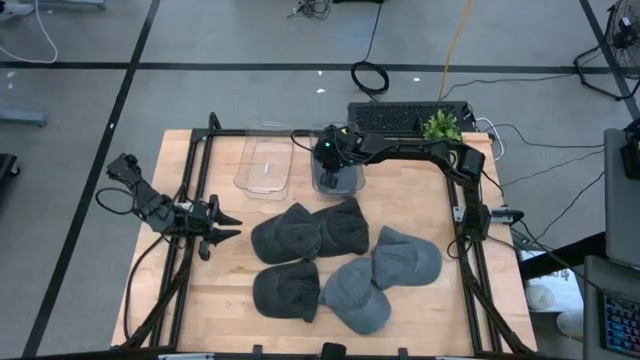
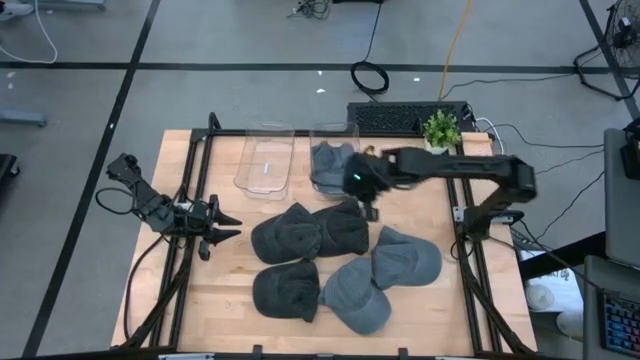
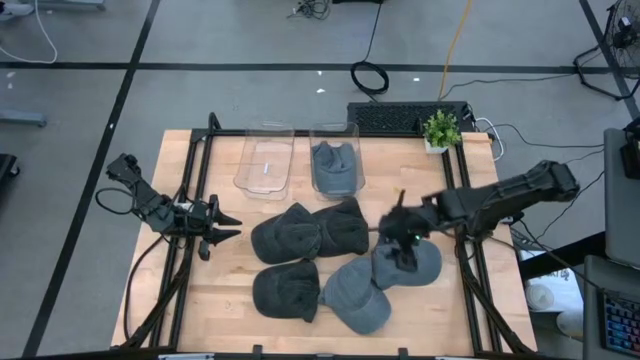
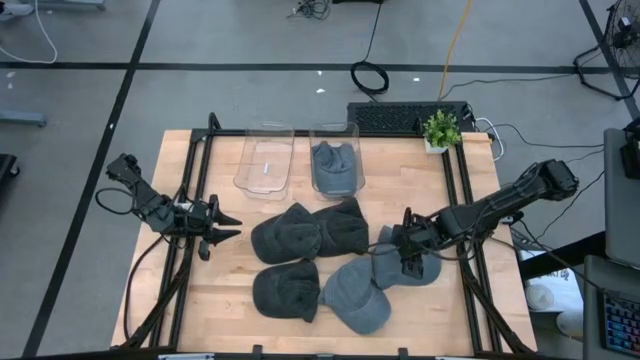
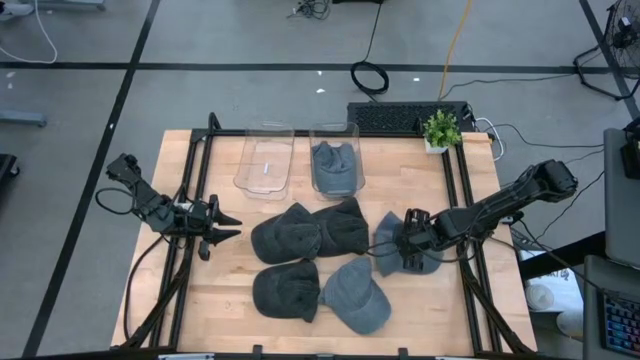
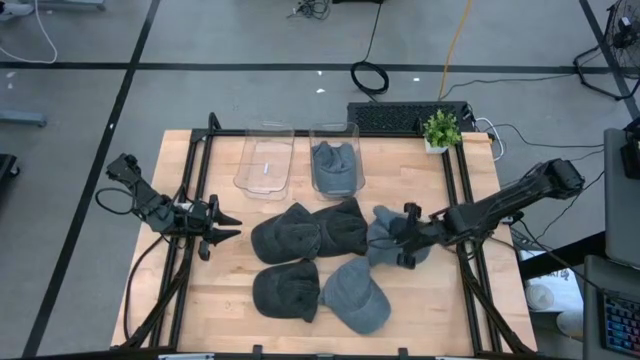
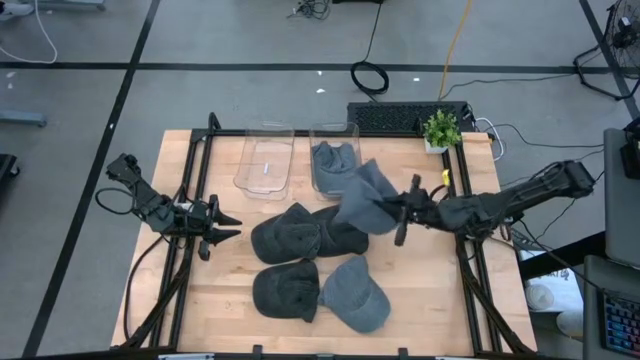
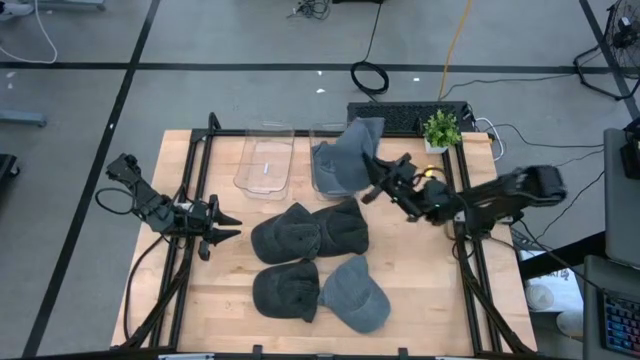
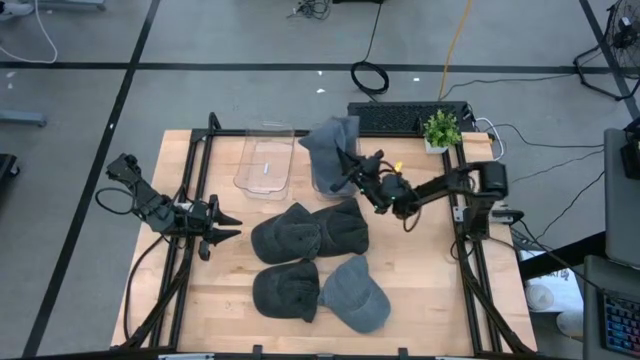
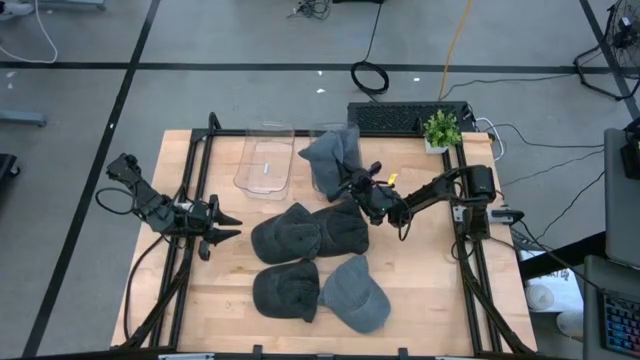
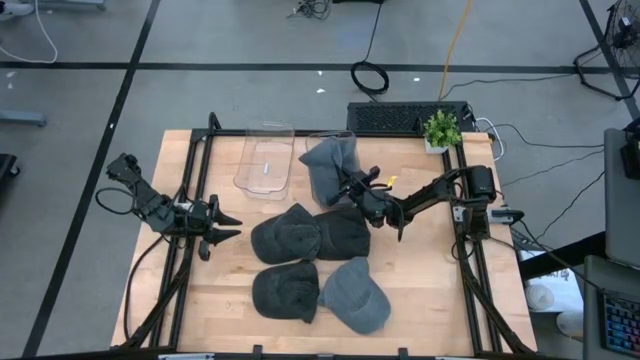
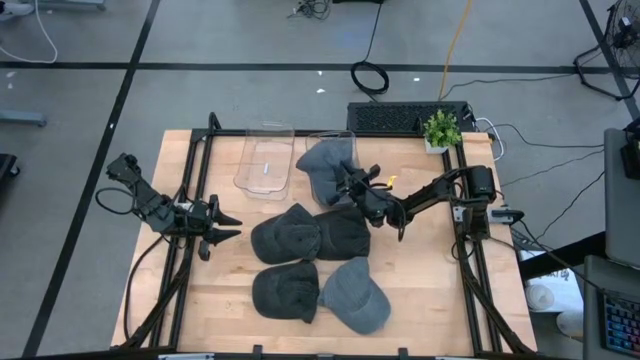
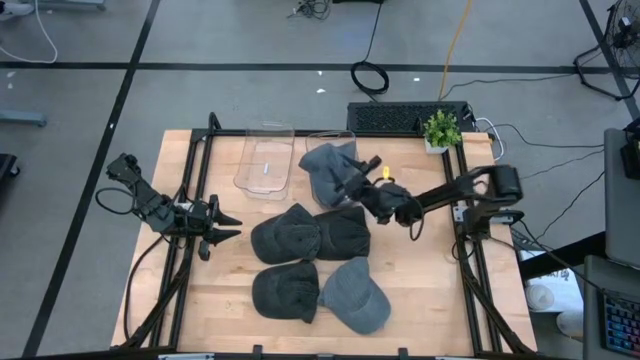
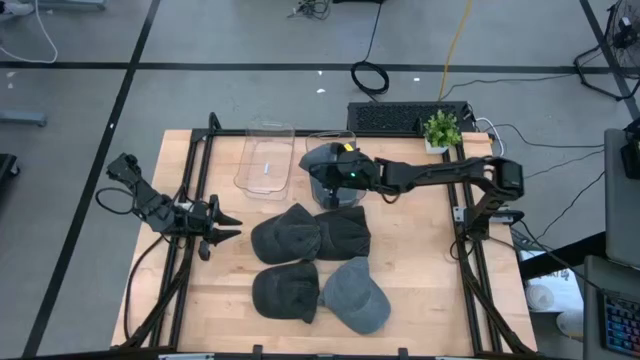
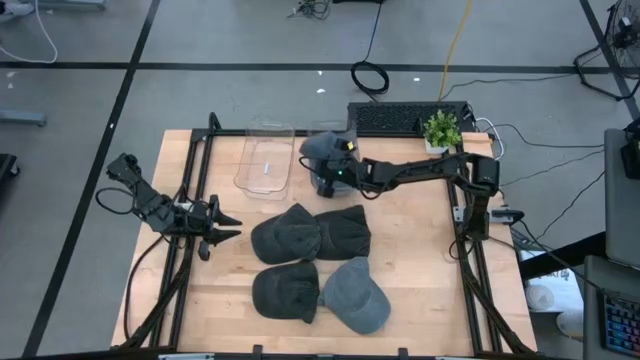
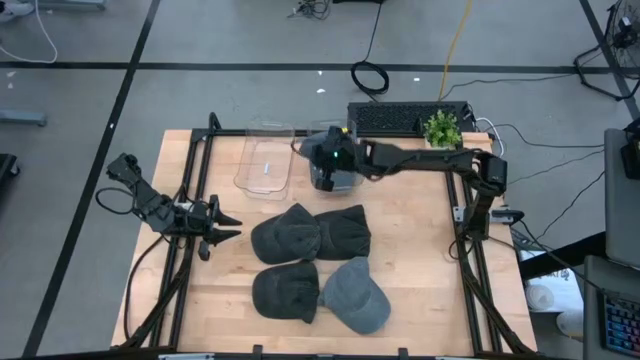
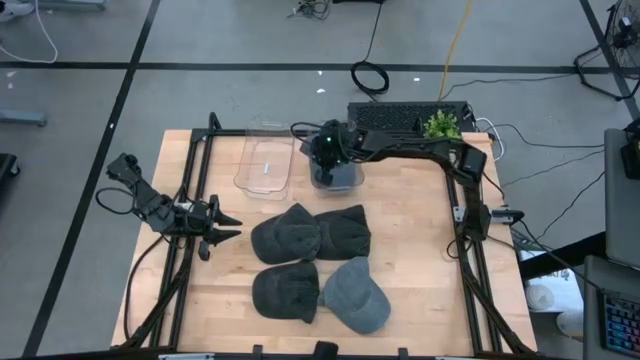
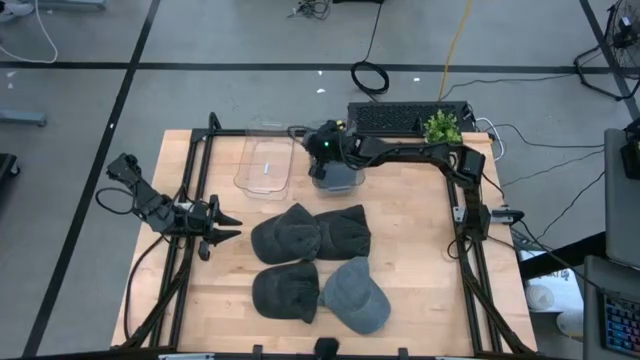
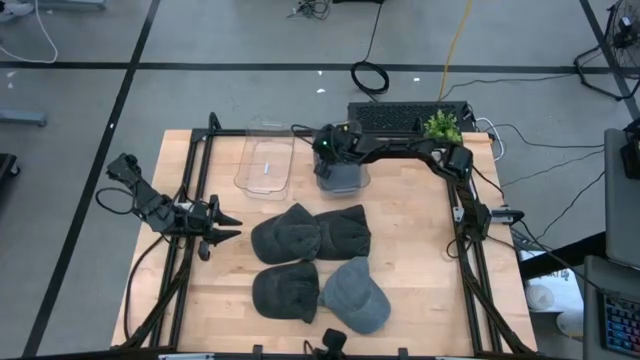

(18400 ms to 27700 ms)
Task: Pick & Place hat
Put the top blue cap into the right transparent bin

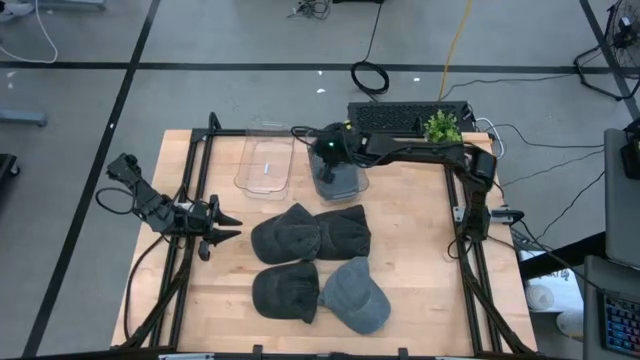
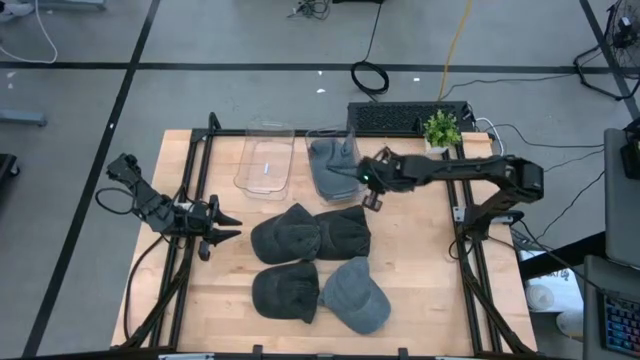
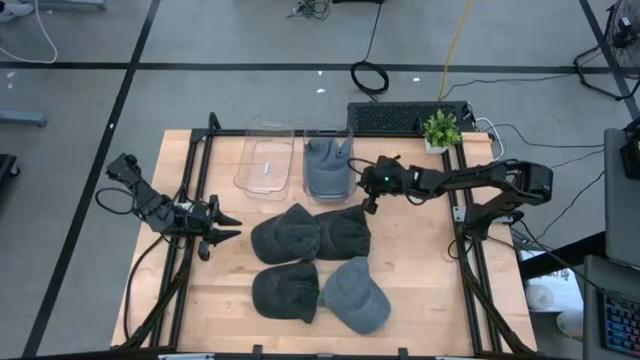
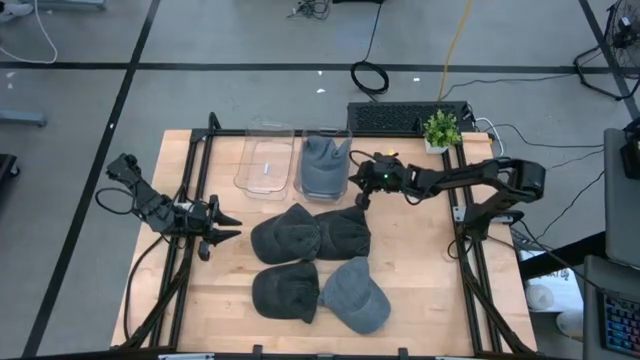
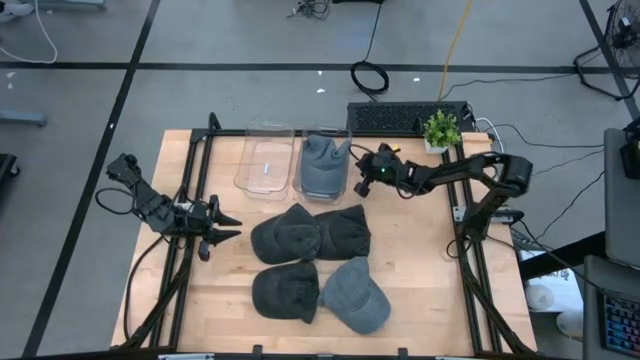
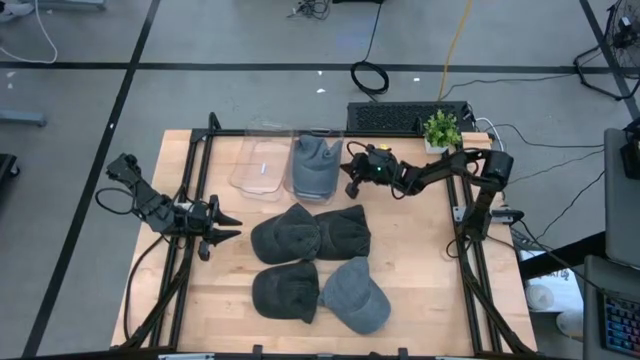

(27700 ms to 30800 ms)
Adjust the right transparent bin

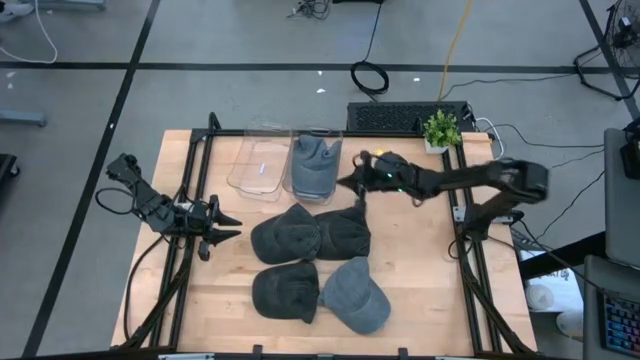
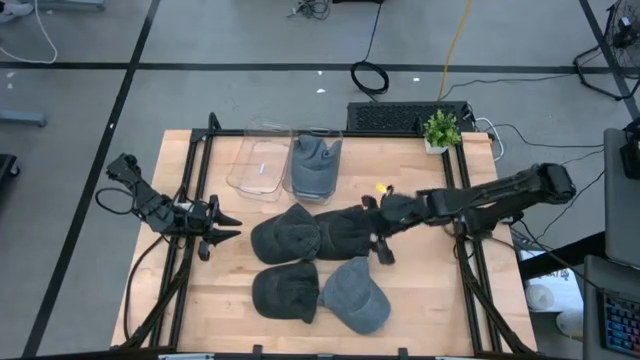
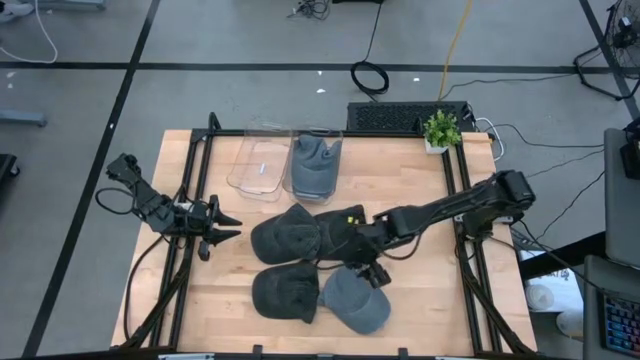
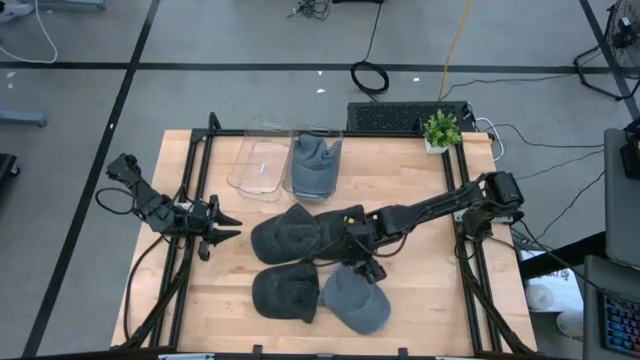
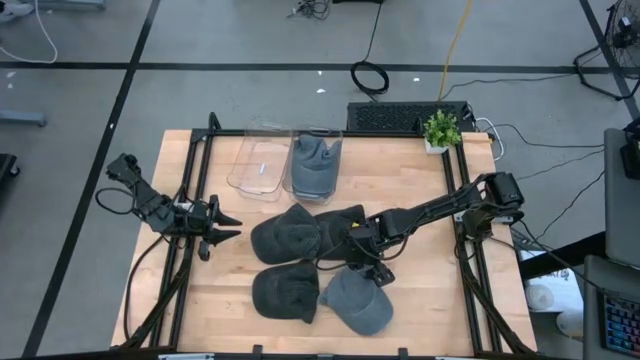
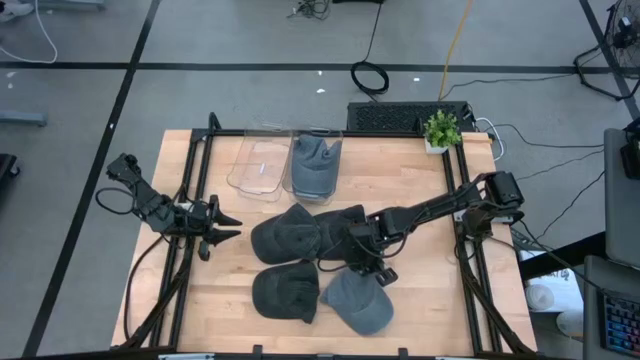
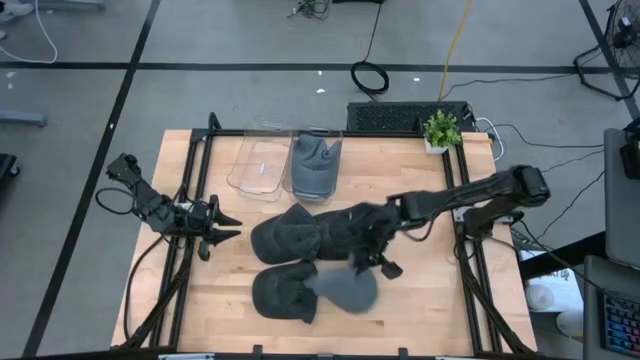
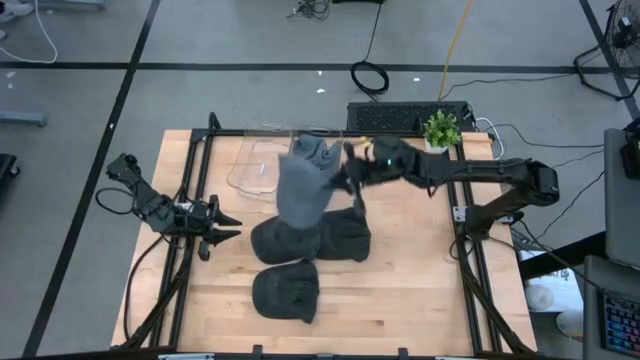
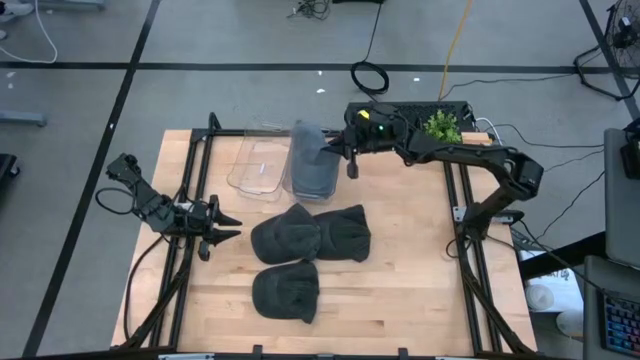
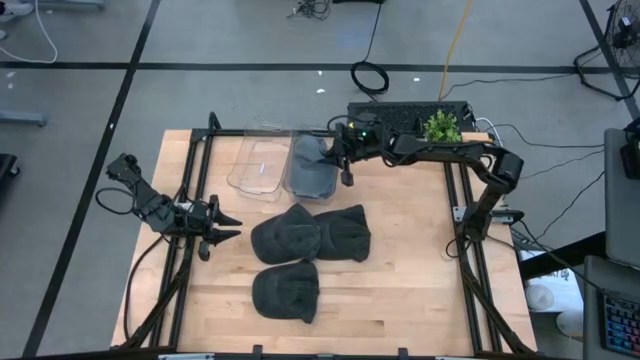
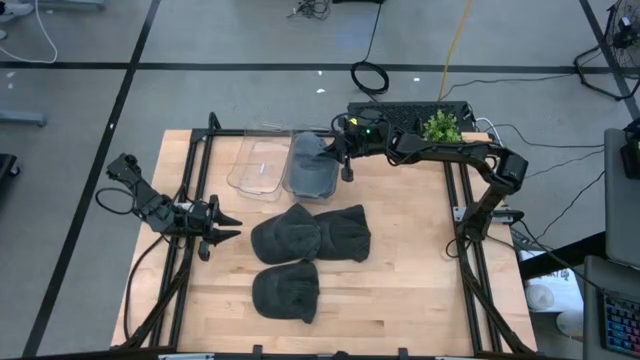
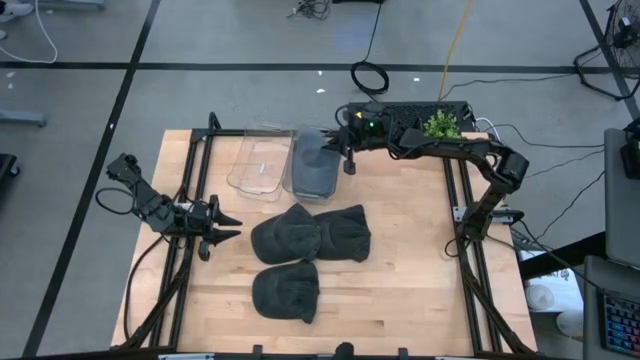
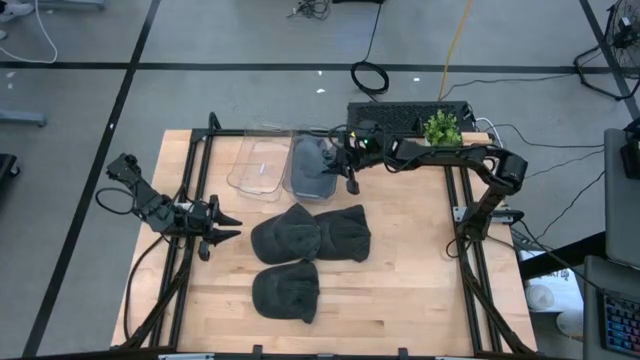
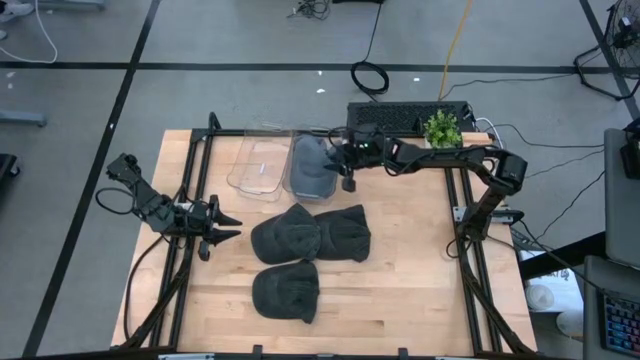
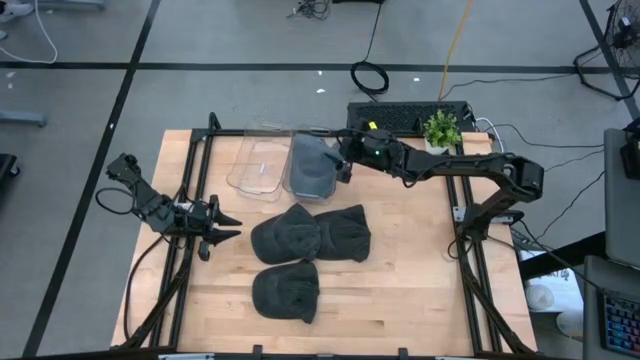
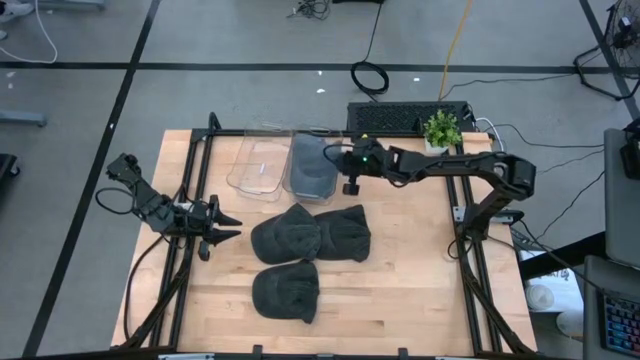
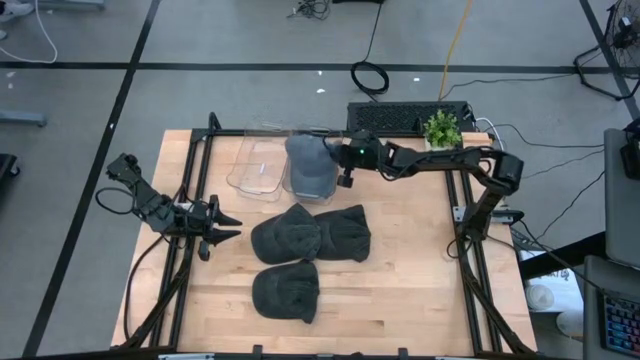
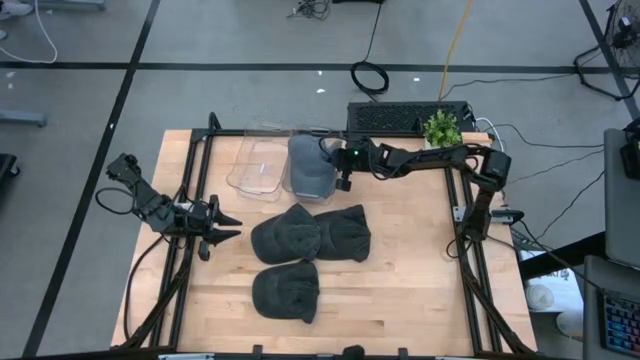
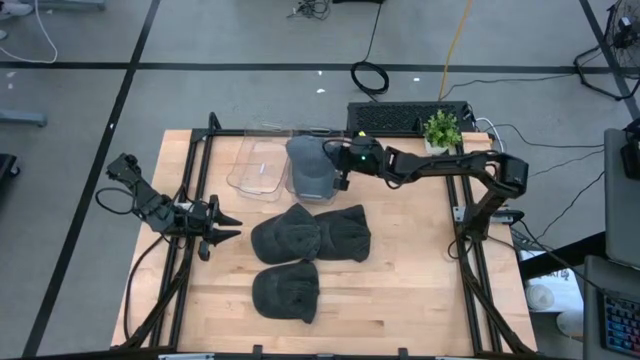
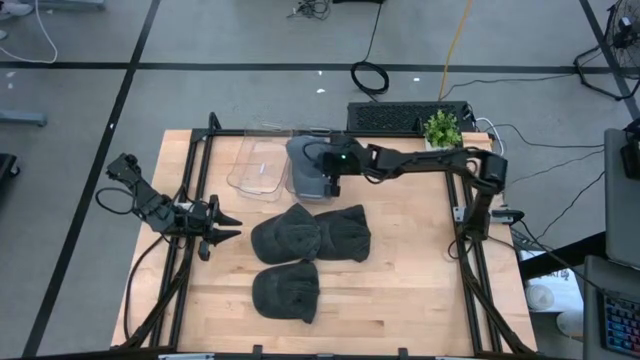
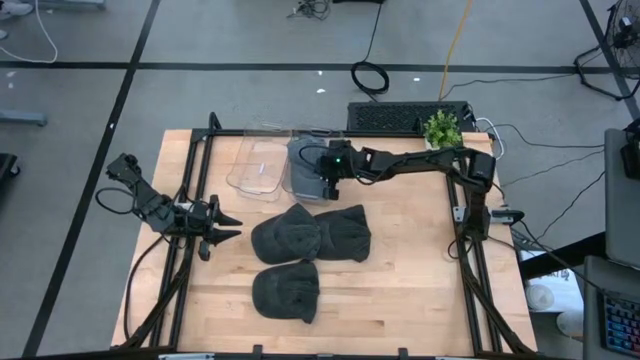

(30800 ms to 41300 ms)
Put the blue cap into the right transparent bin
